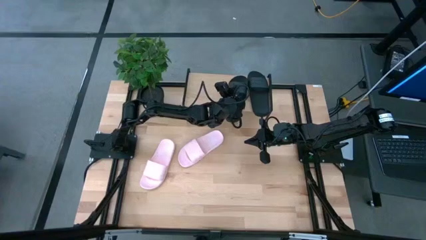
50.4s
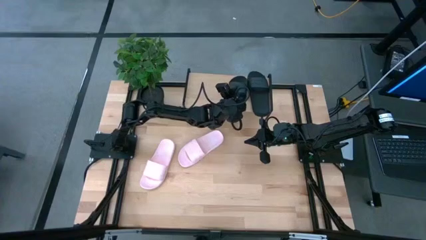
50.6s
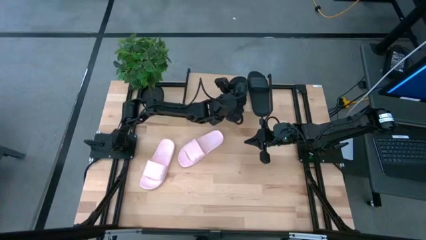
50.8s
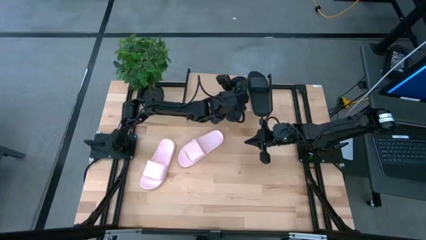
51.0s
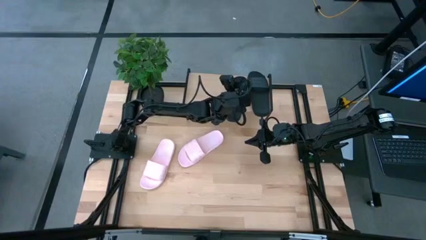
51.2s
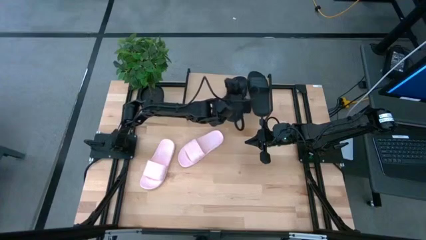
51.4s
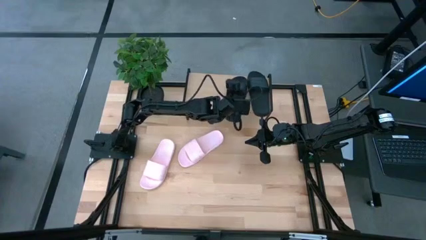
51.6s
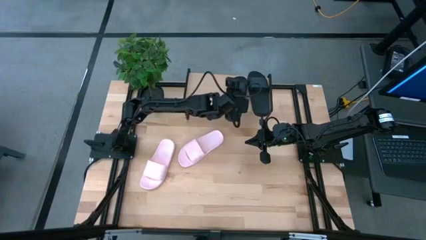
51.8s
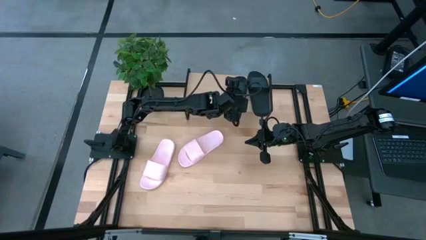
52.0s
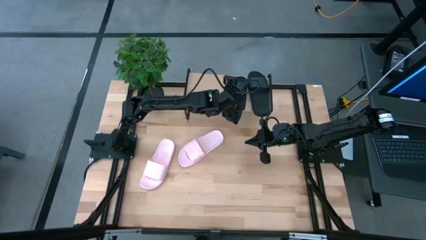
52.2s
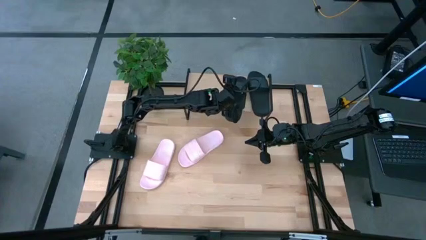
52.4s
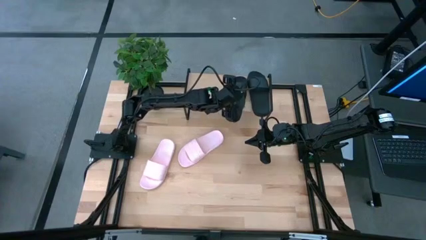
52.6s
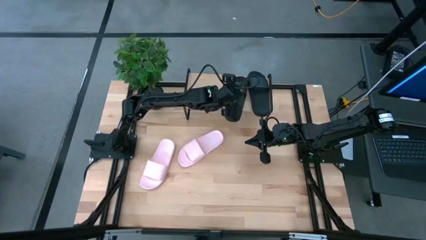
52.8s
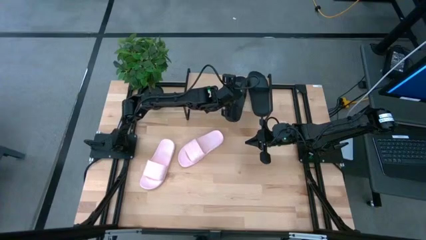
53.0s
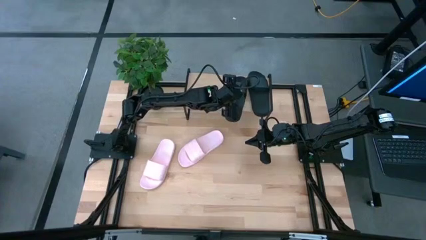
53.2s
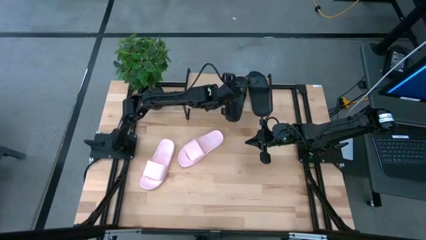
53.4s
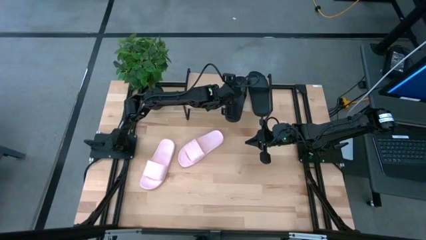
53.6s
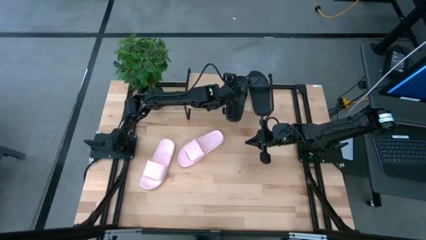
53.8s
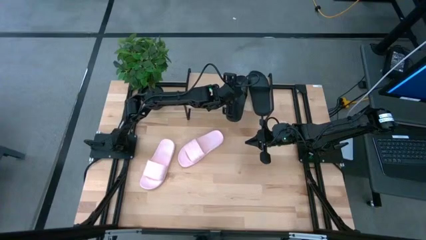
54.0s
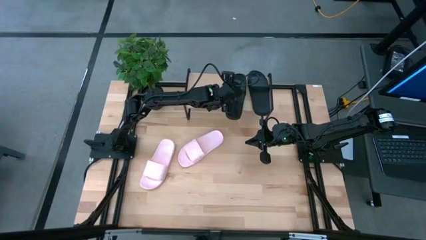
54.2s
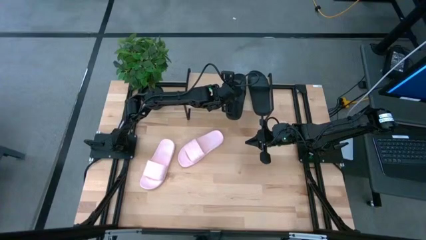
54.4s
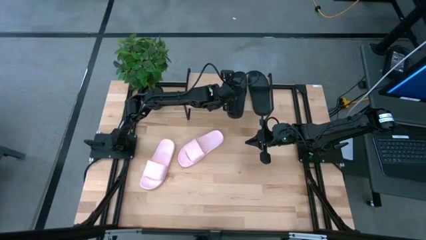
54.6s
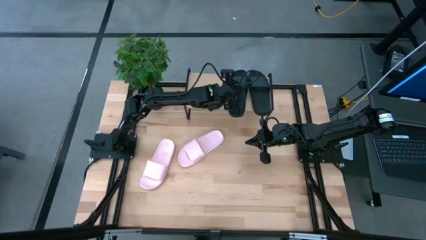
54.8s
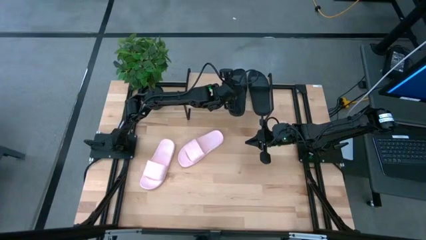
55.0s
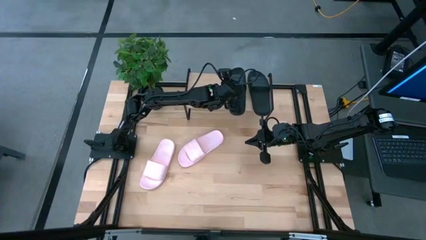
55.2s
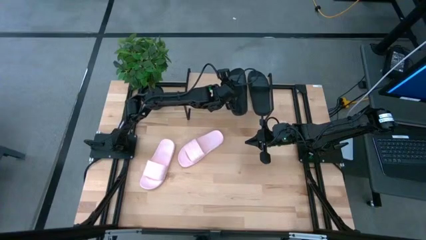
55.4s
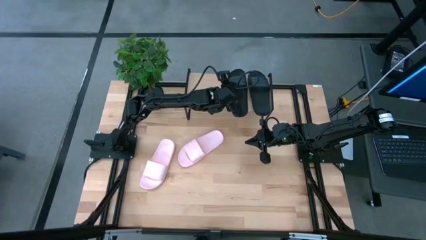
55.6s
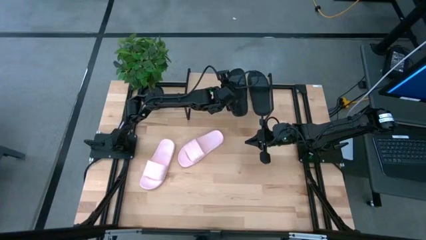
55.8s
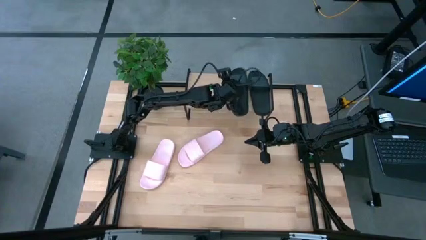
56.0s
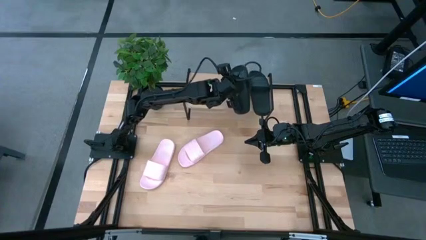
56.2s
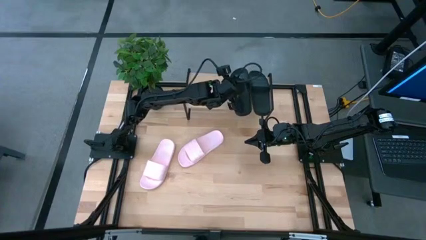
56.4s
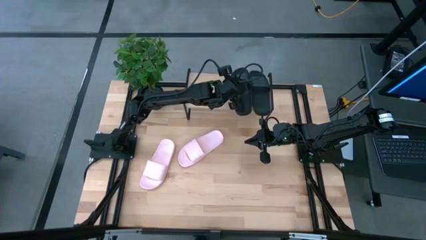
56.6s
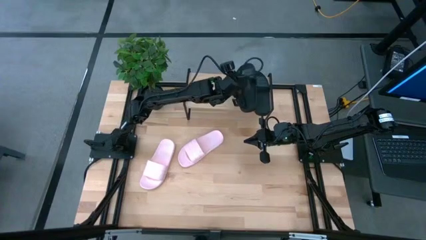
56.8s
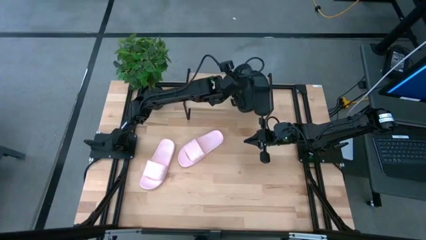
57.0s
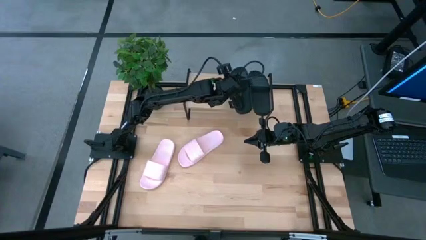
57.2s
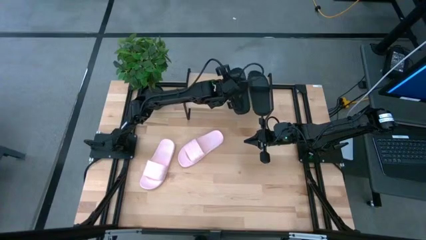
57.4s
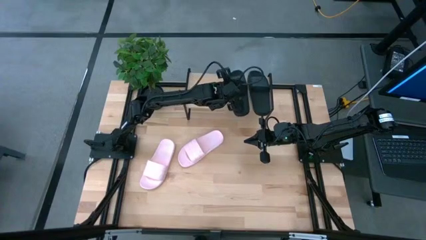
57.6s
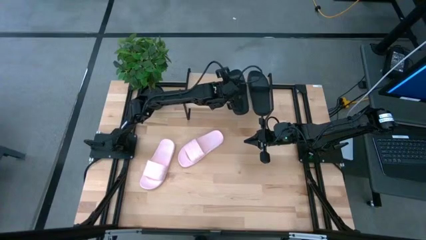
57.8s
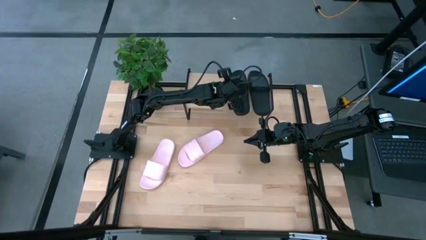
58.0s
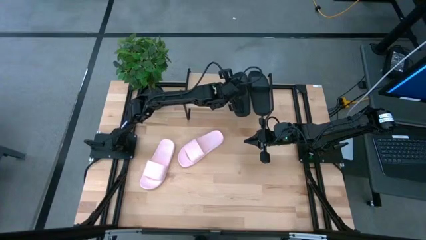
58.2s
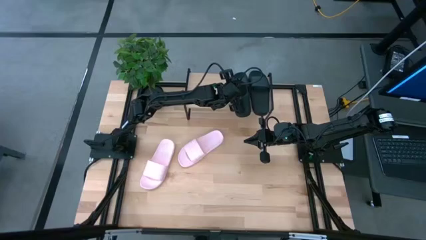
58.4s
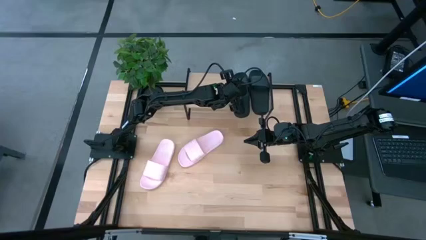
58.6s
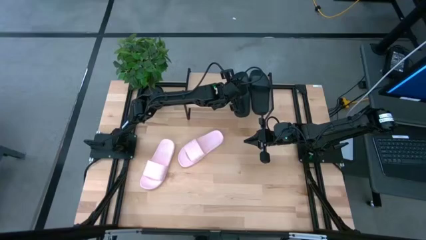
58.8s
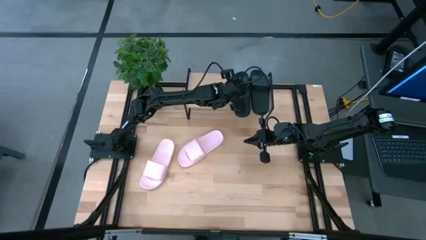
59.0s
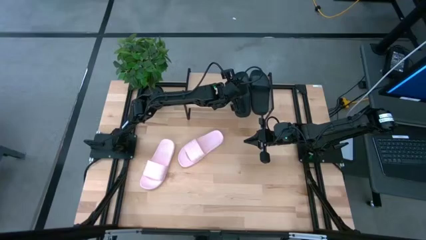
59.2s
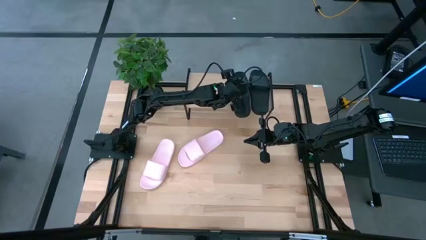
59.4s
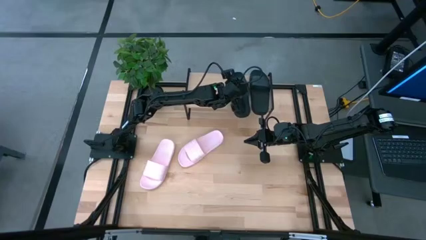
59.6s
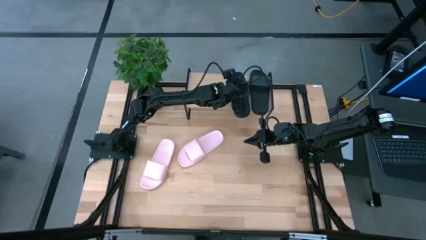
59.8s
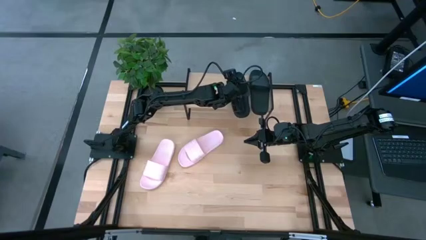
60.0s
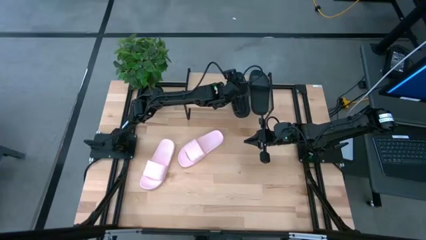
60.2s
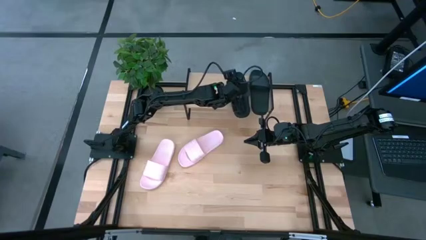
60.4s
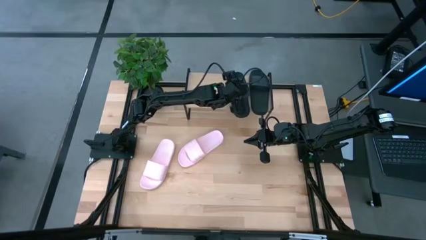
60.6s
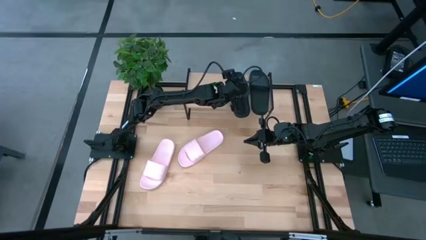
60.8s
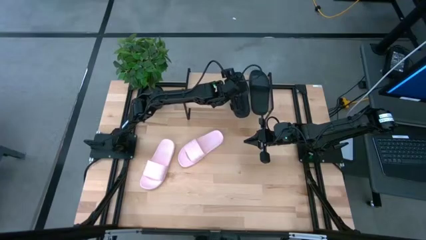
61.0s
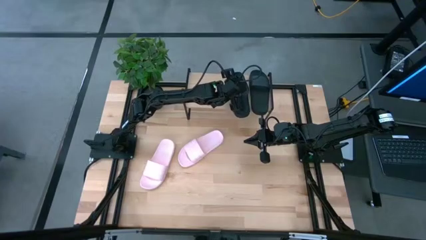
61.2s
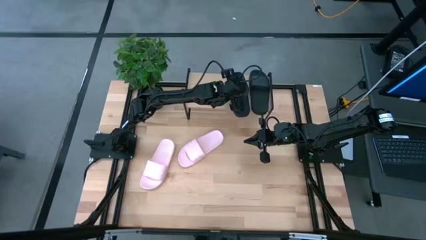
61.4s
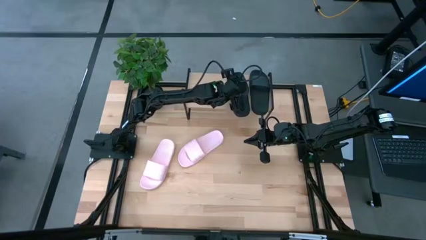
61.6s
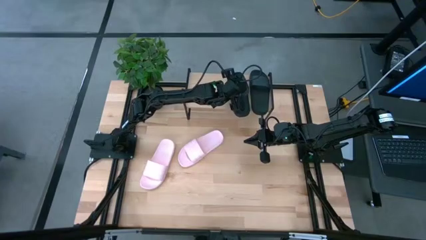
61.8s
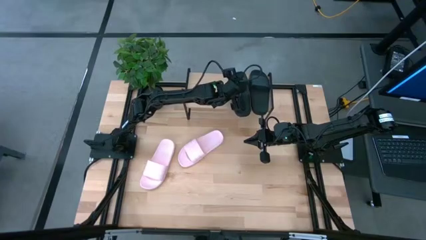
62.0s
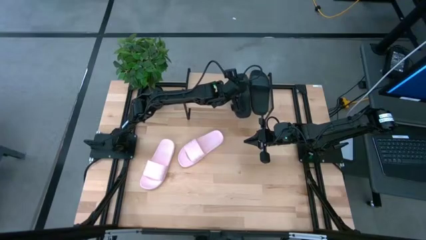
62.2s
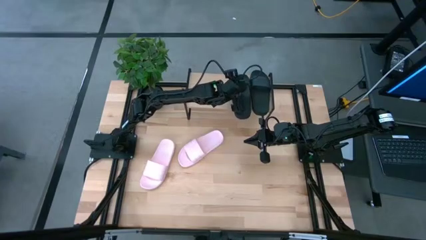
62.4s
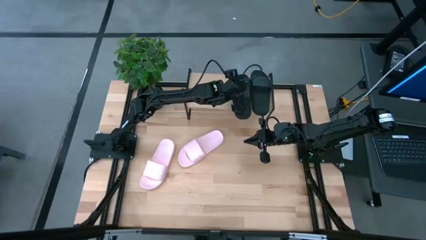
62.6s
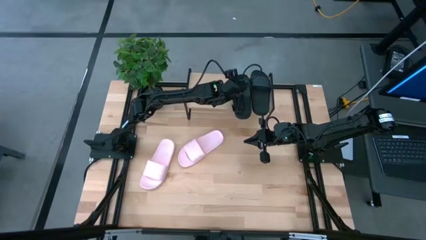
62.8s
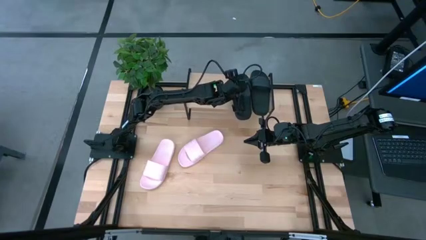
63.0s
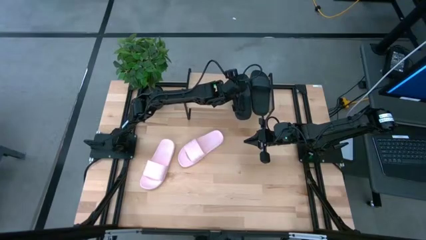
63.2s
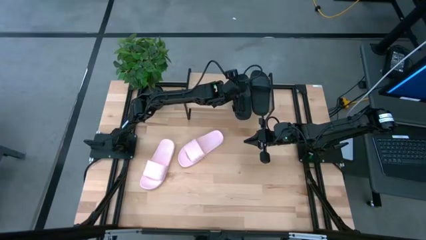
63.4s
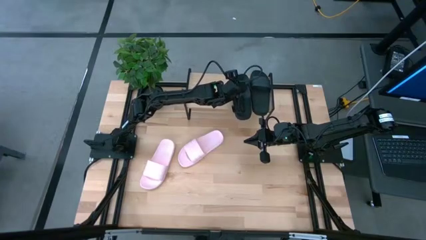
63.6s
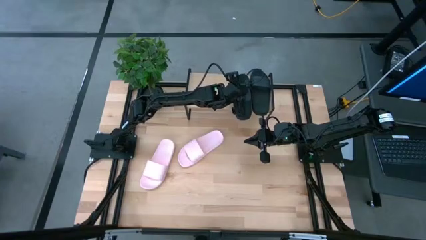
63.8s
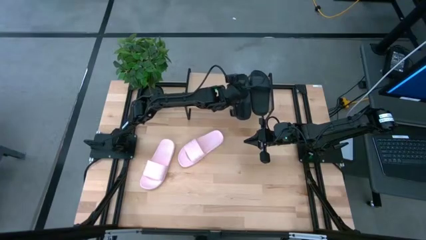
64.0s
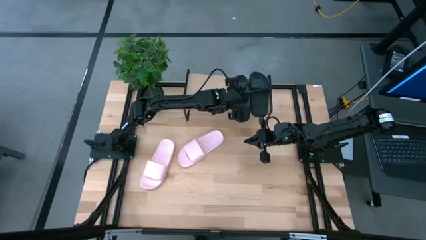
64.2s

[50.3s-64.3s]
Task: Pick and place slides into the shelf
Put the black slide on the shelf

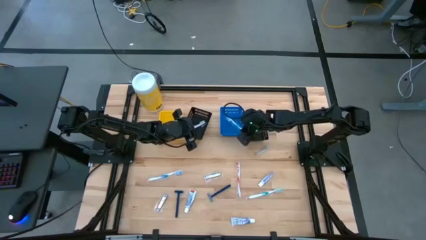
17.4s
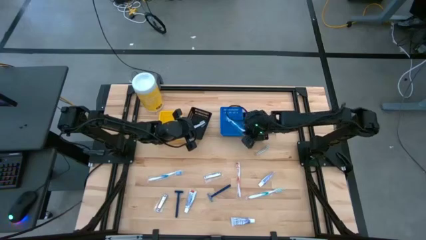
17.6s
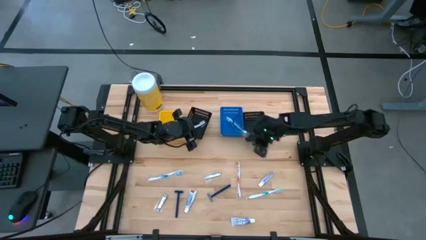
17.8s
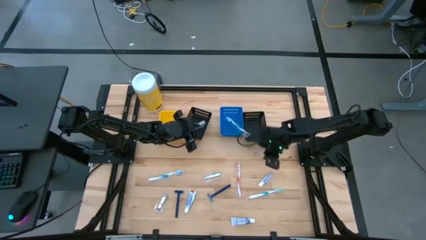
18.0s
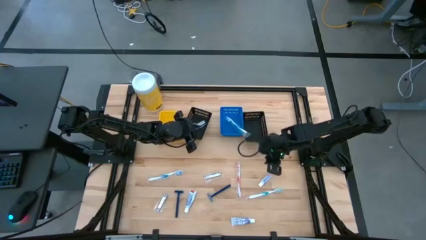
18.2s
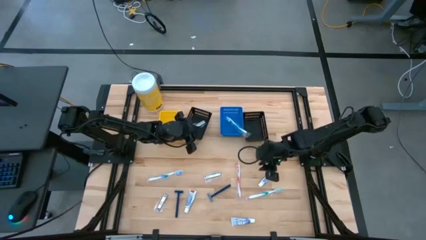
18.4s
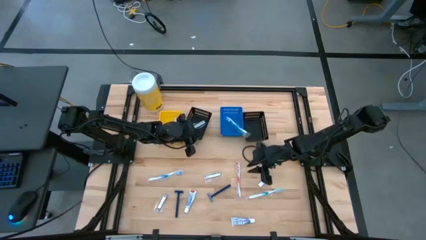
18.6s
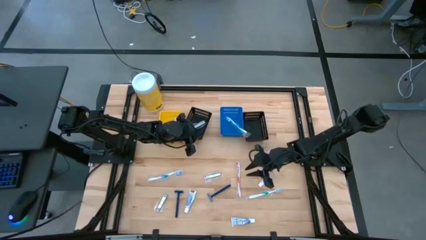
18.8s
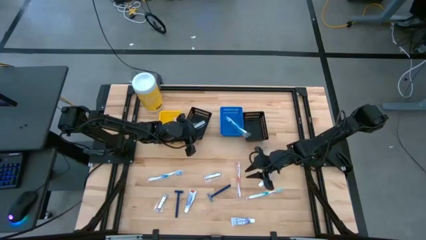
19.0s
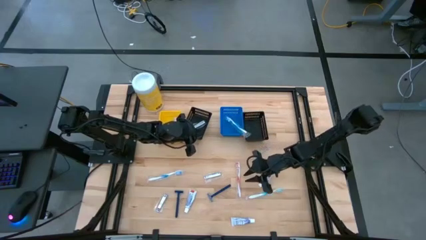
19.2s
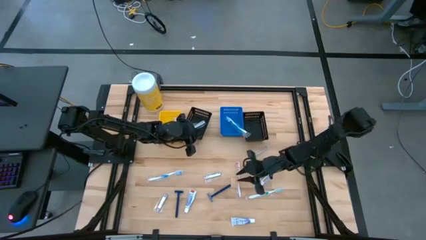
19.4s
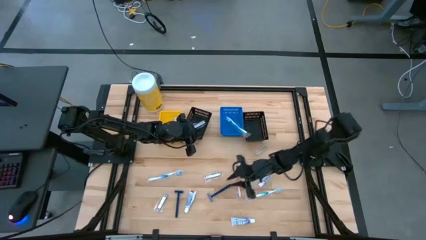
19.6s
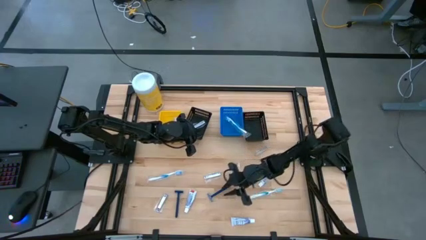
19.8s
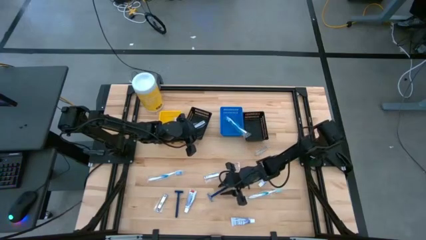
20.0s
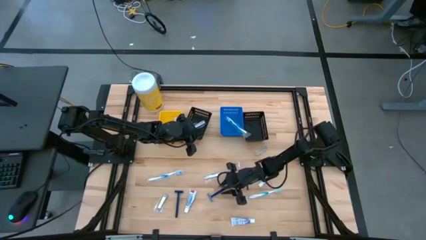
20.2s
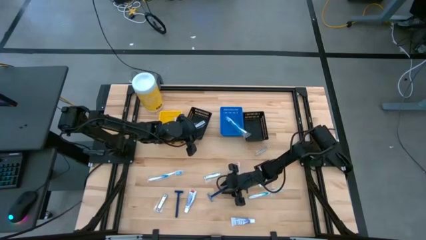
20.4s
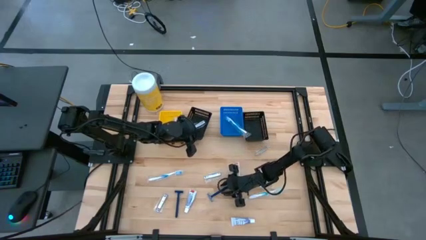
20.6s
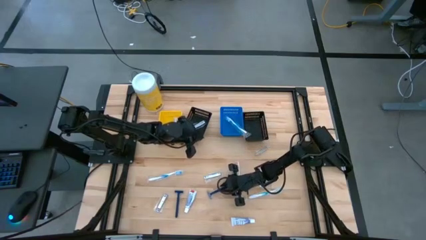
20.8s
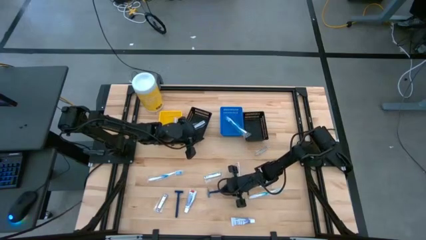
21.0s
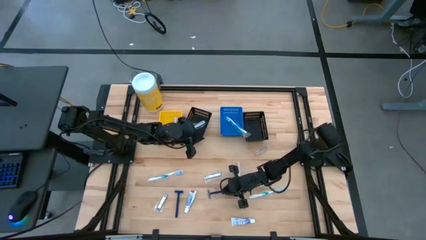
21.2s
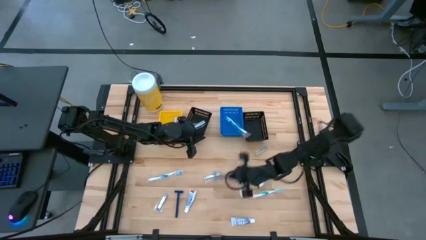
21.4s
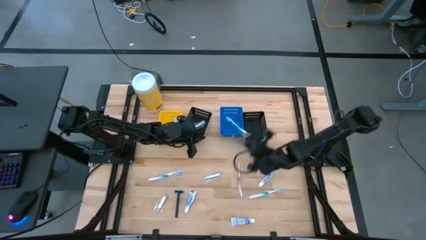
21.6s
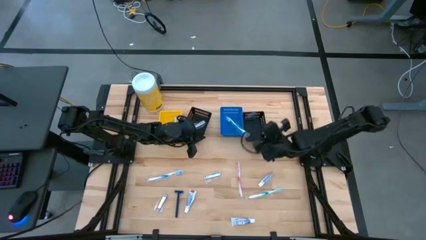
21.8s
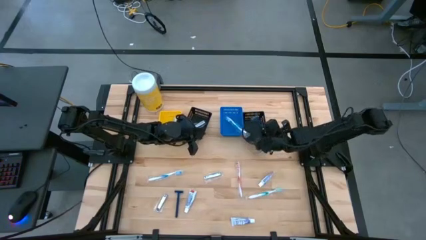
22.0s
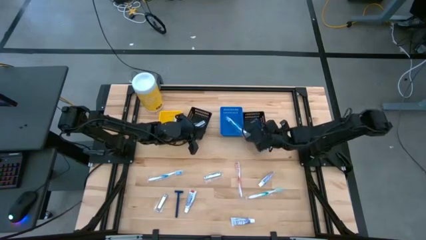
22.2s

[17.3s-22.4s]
Task: Pick & Place Travel size toiletries
Put the blue razor into the left black bin
